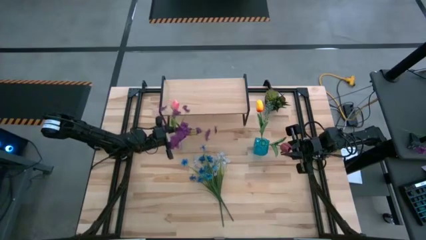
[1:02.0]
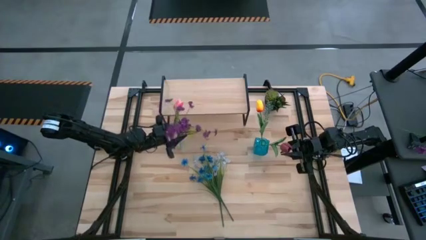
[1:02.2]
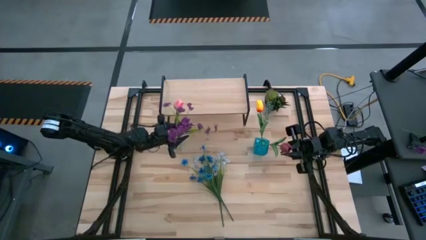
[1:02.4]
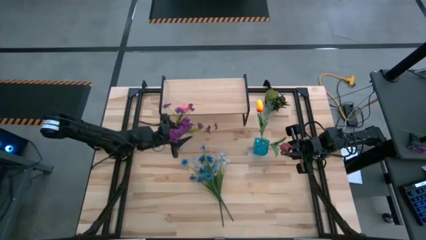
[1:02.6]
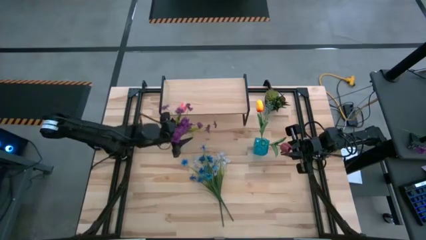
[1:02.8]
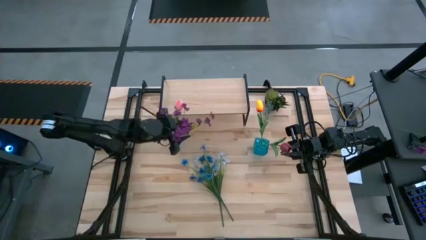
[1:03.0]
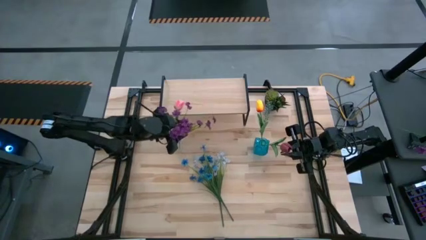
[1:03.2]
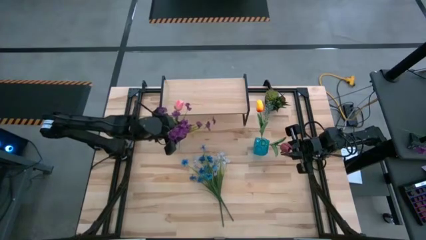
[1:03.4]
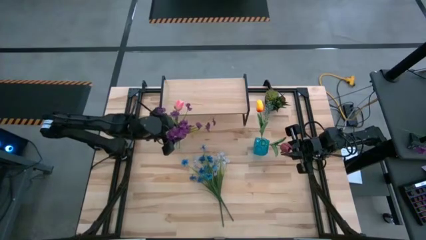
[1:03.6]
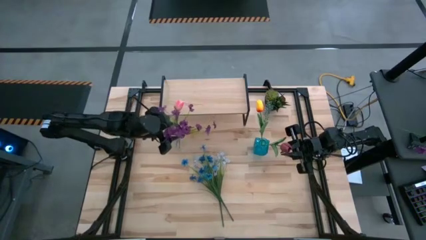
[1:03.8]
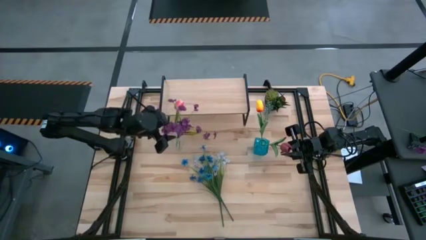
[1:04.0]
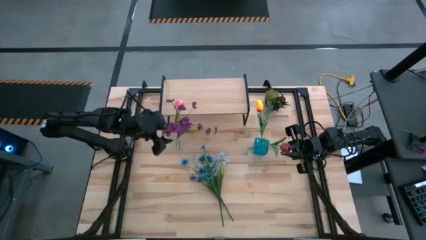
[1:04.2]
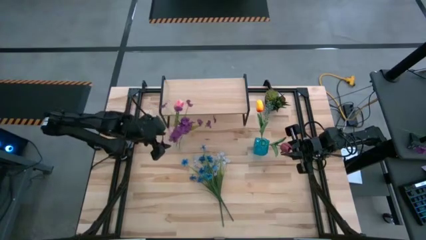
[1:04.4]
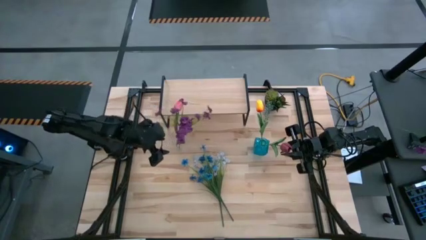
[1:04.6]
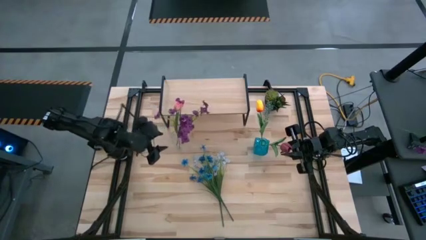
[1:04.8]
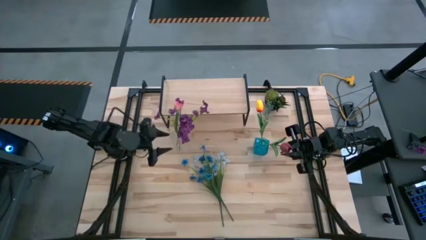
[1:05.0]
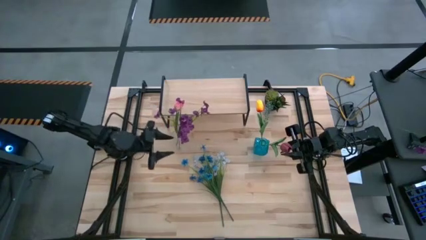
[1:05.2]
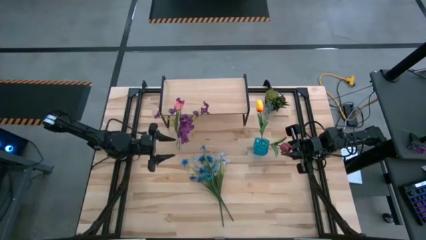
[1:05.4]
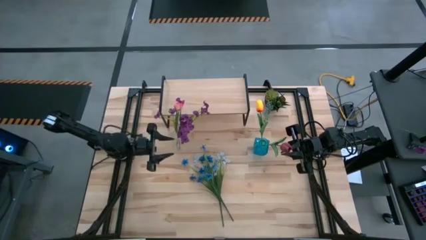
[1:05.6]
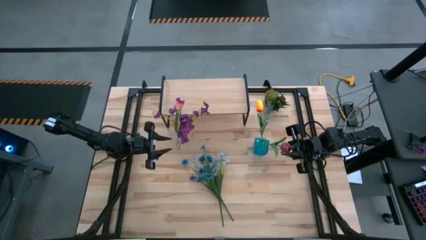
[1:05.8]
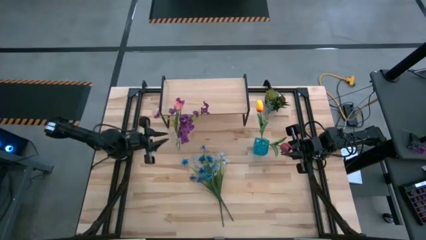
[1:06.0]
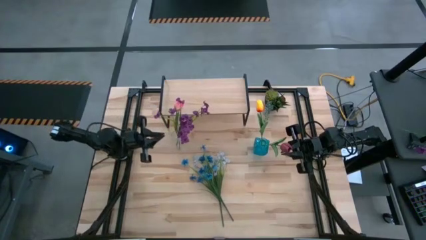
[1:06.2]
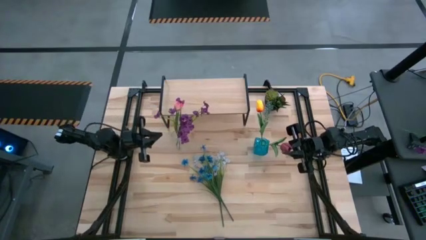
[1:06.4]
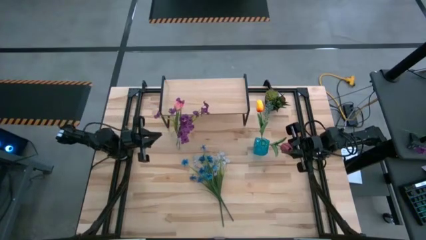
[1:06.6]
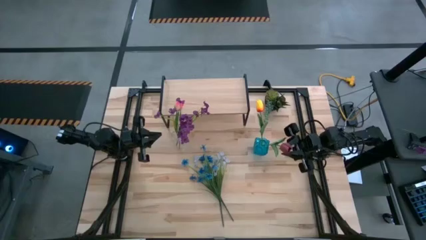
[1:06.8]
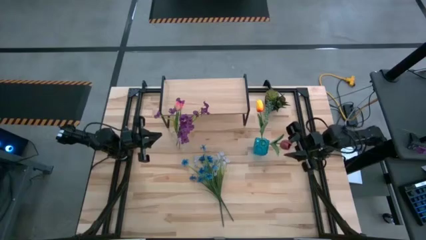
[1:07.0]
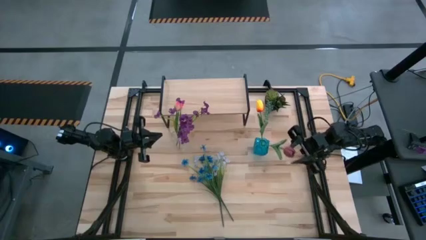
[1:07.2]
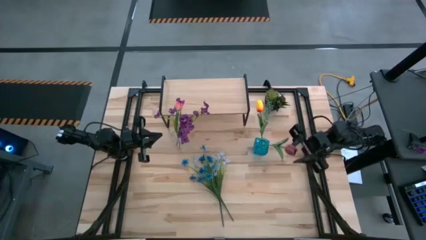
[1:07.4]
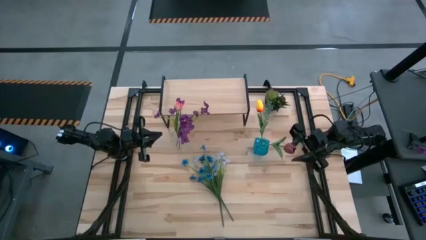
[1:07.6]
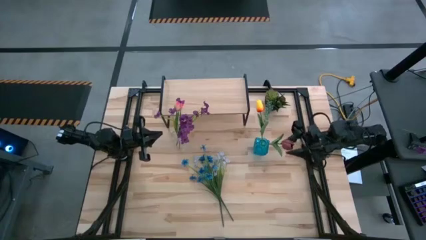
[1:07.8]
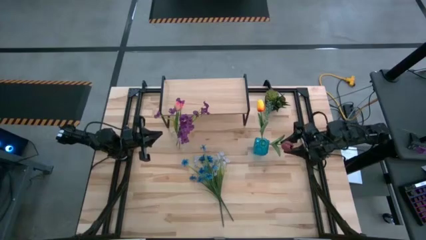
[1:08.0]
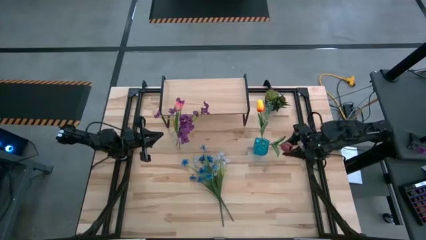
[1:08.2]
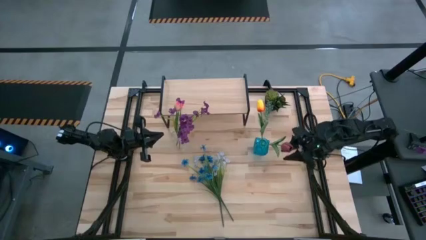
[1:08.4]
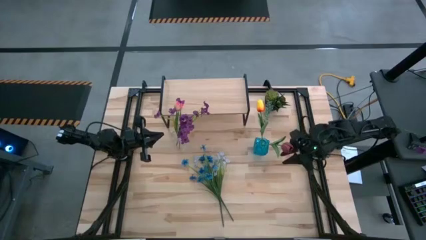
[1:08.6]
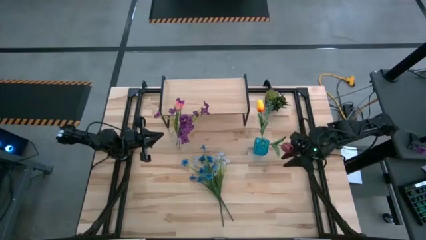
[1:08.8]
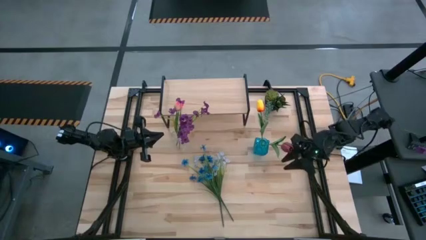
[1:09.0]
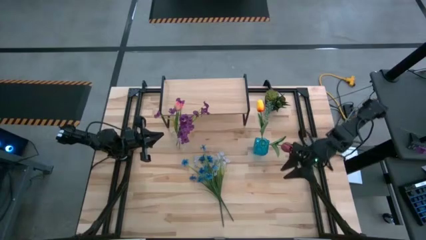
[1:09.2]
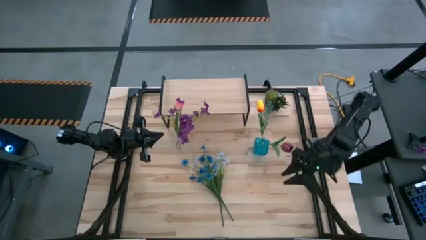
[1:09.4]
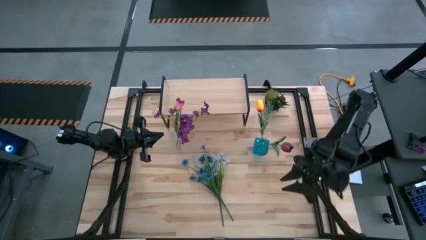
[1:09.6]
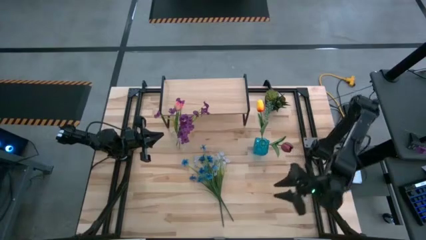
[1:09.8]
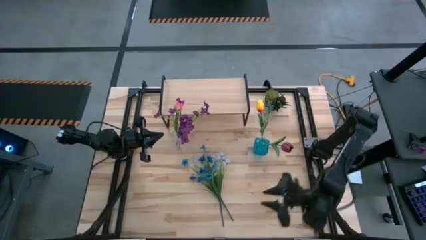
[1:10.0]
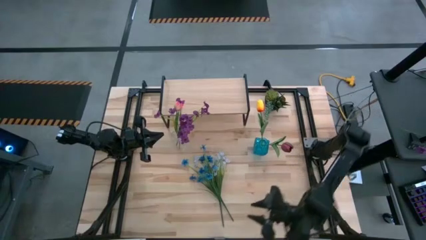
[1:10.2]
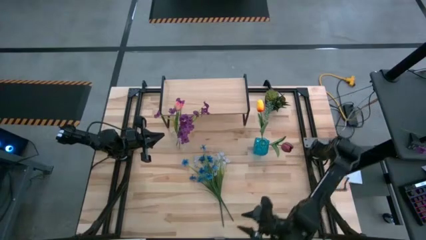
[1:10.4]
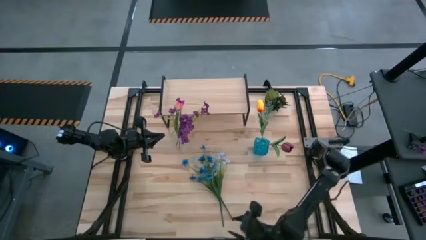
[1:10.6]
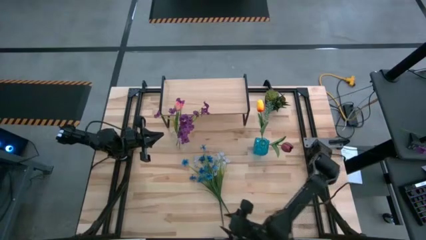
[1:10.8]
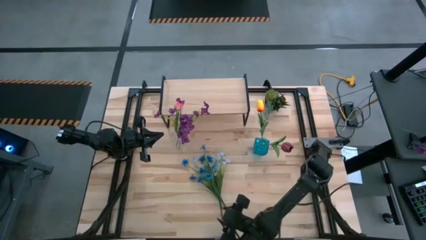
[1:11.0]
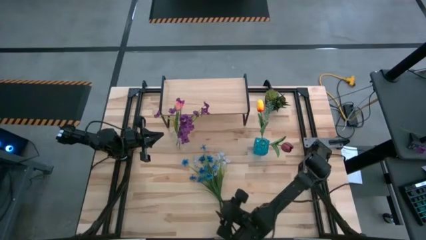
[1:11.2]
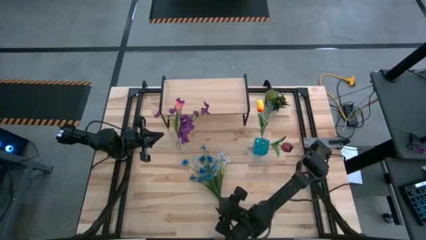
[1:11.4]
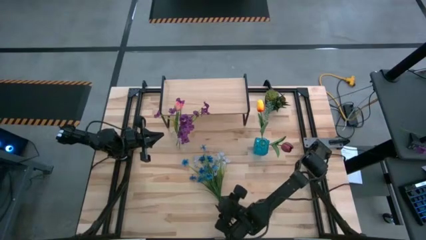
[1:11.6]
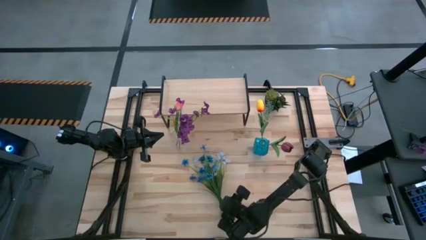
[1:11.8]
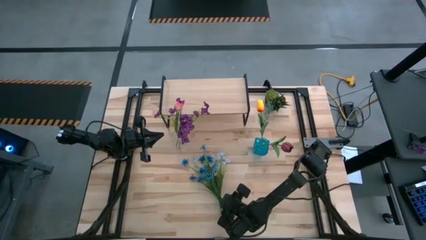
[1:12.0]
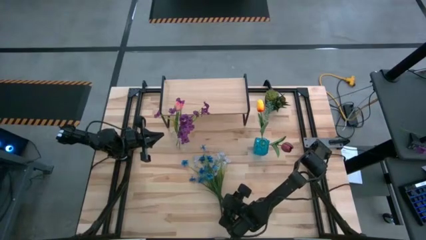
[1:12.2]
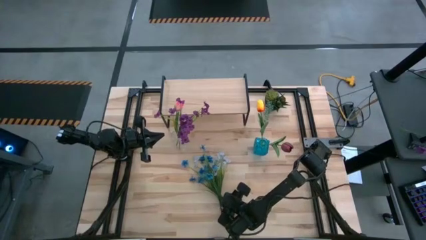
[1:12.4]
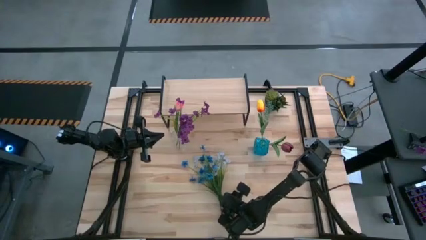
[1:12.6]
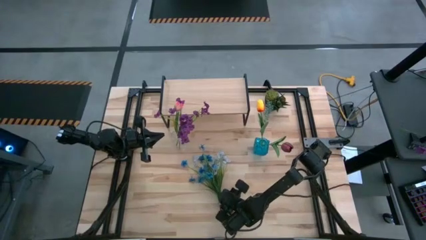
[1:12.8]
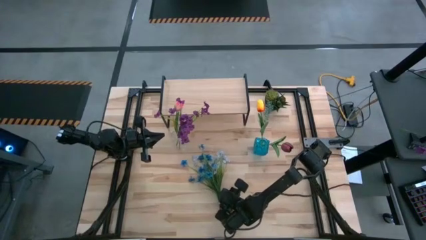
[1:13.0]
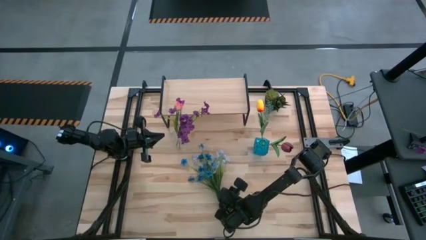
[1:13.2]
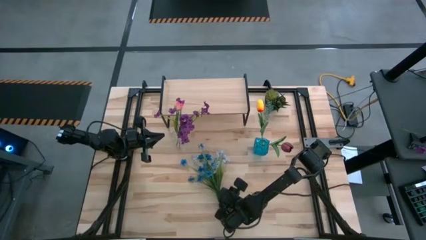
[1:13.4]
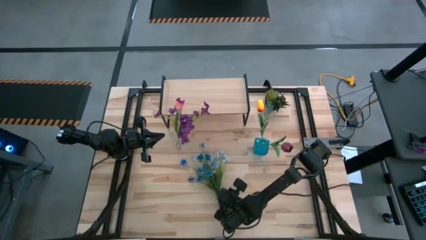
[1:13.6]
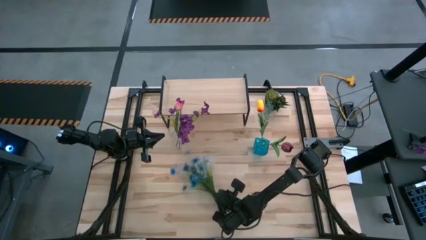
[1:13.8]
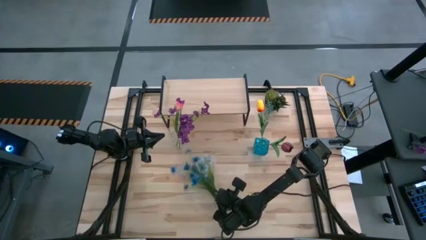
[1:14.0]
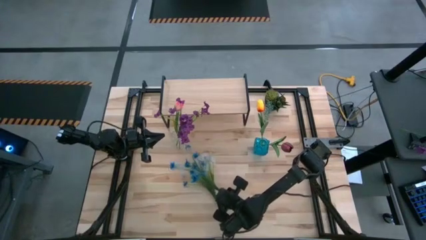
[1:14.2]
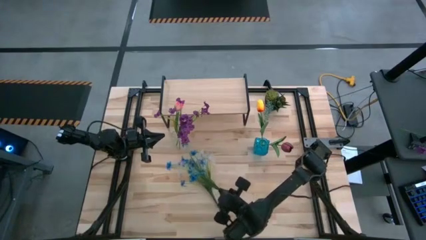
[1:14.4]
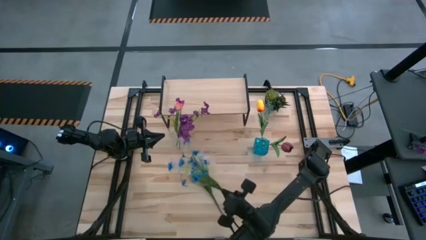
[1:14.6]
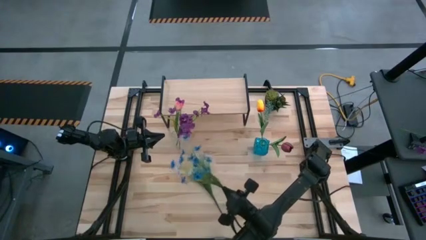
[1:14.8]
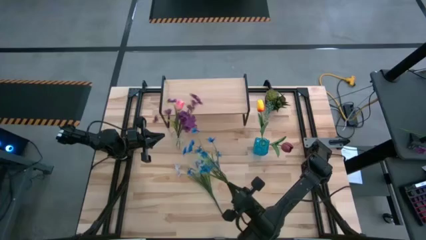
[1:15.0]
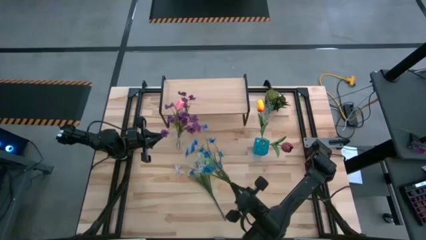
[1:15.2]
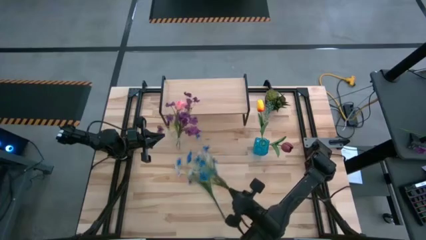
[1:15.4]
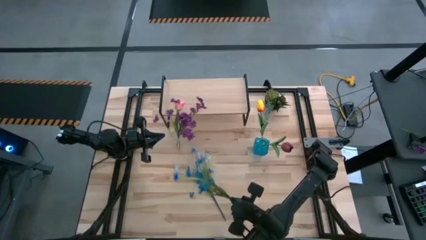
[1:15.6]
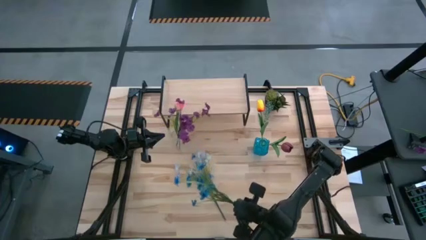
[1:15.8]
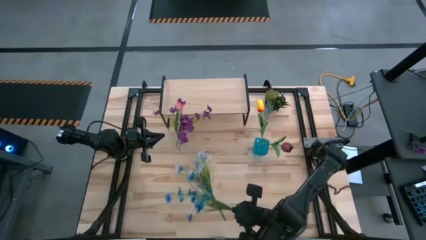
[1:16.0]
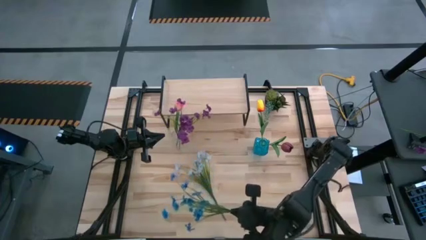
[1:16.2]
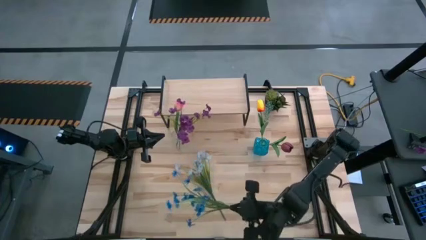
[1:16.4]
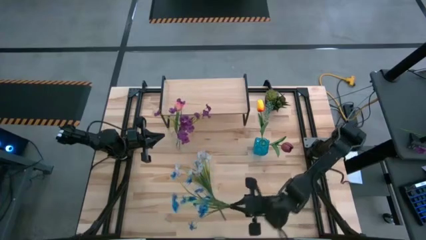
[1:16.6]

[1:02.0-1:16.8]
Task: Pick and place flowers into a vace then onto a shelf
Put the blue flower into the blue transparent vase

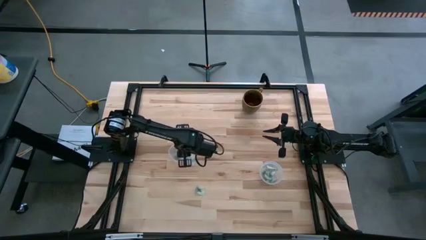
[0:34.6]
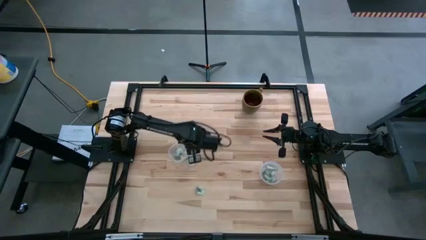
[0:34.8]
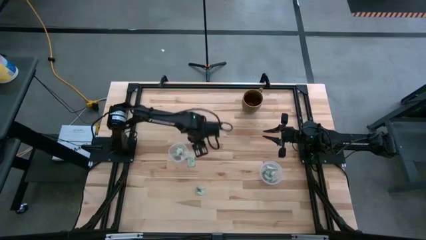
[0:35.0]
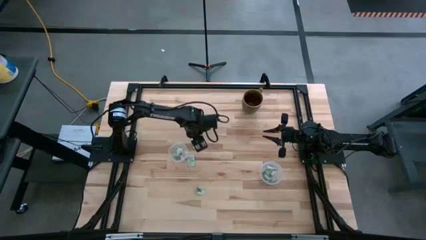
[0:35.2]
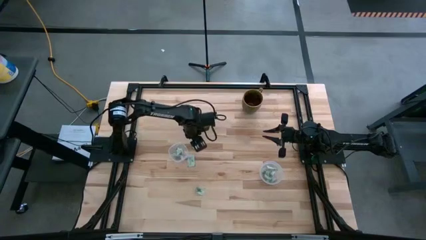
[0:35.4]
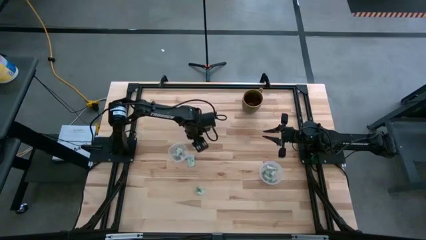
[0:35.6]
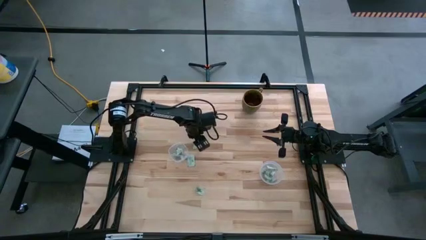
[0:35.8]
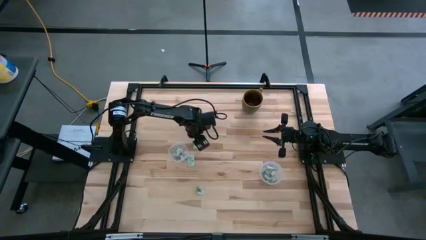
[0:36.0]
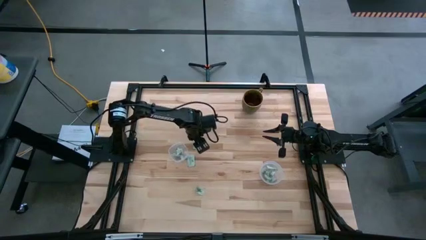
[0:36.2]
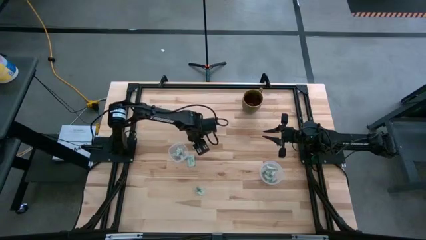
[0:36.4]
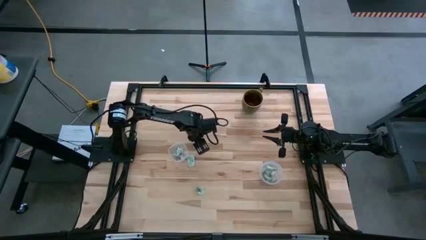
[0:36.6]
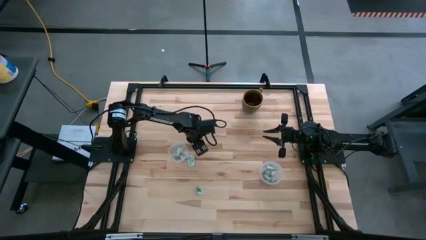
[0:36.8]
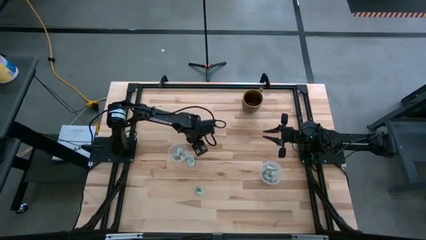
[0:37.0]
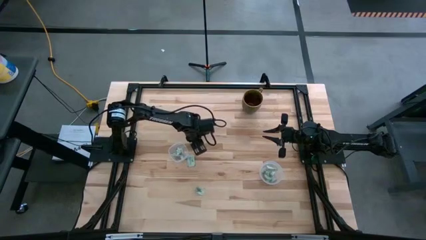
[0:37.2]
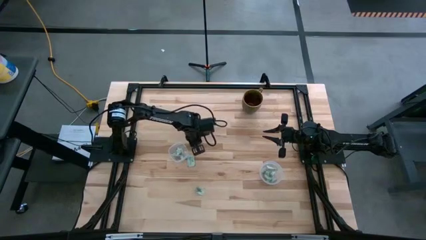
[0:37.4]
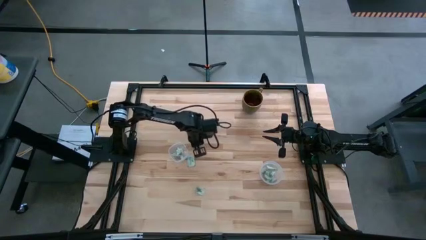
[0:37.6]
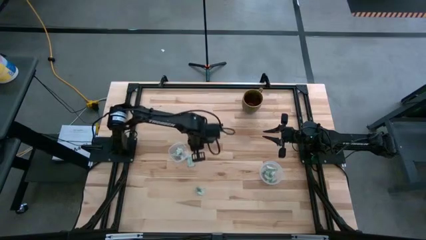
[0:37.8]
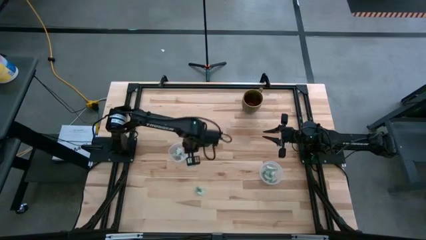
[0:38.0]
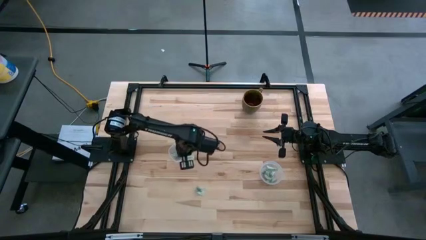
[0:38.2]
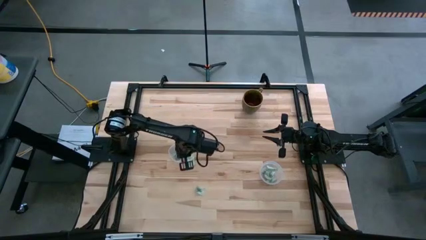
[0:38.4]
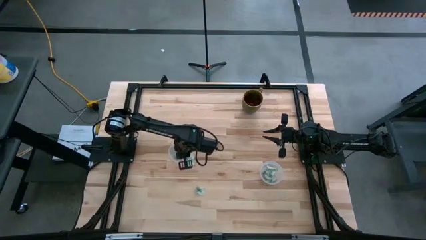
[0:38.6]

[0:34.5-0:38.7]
Task: Pick and place Stevia / Truvia into bins
Put the stevia packet into the square transparent container
